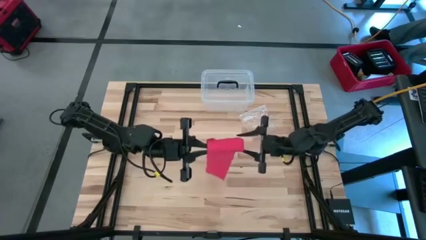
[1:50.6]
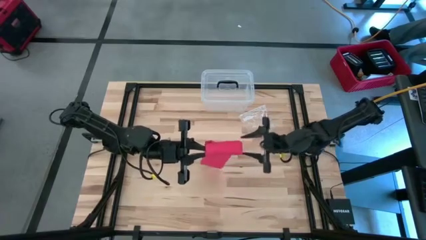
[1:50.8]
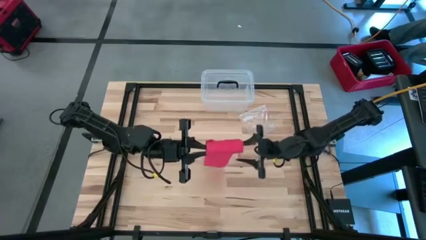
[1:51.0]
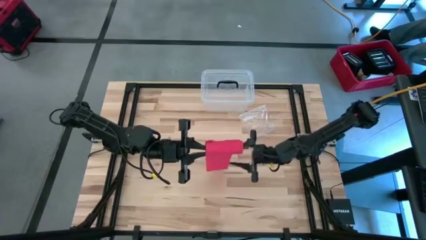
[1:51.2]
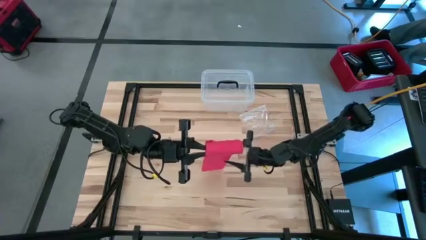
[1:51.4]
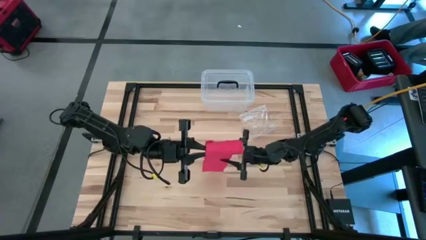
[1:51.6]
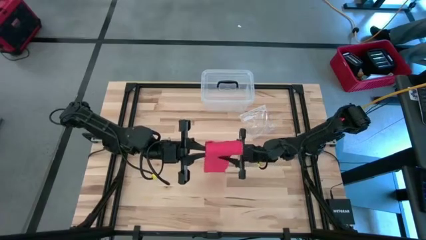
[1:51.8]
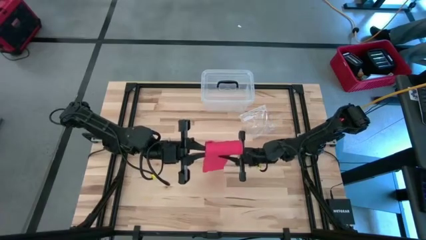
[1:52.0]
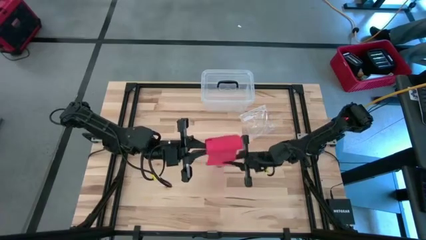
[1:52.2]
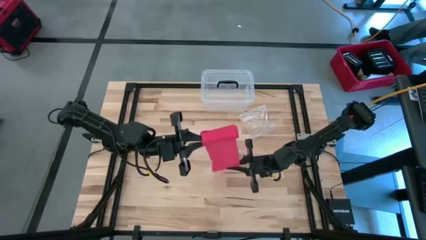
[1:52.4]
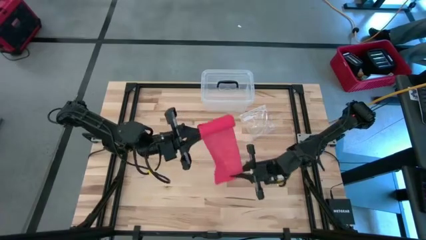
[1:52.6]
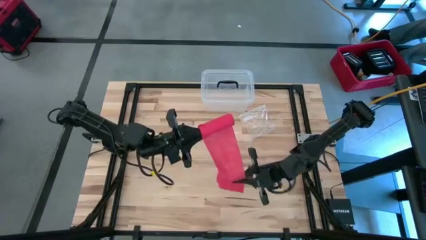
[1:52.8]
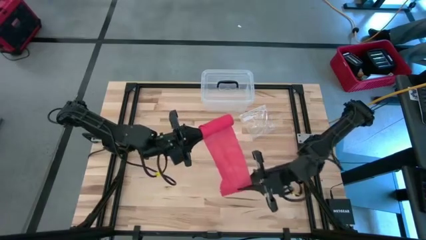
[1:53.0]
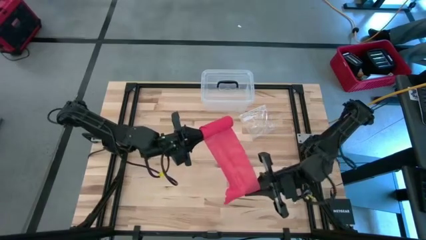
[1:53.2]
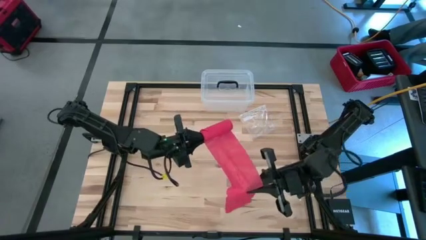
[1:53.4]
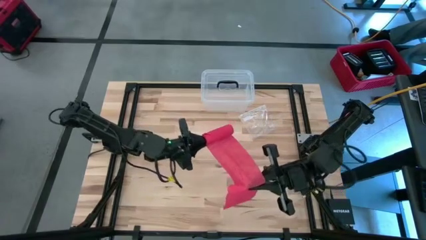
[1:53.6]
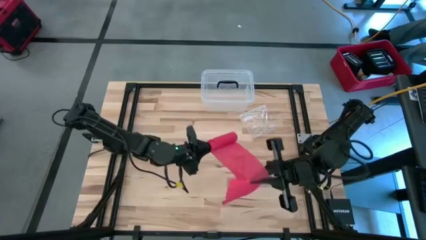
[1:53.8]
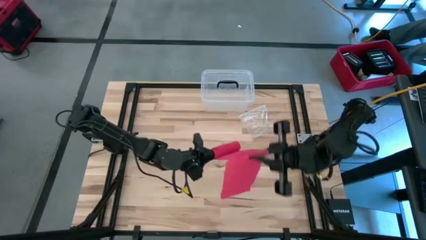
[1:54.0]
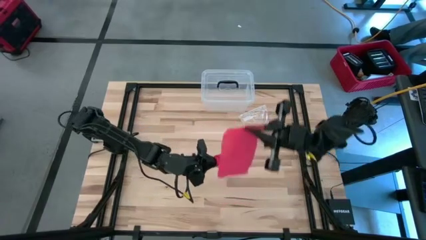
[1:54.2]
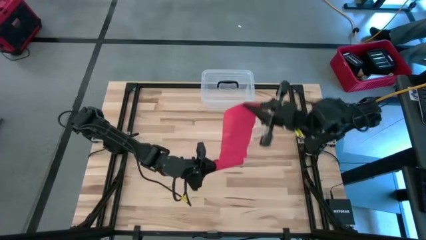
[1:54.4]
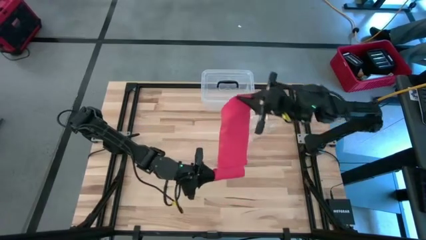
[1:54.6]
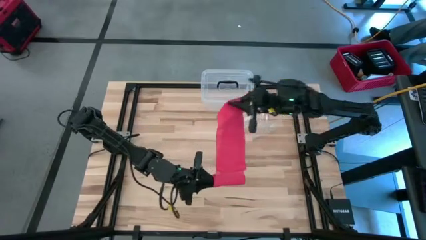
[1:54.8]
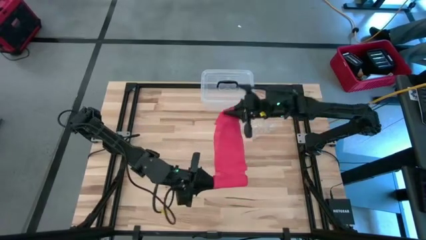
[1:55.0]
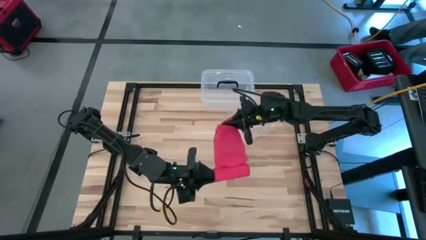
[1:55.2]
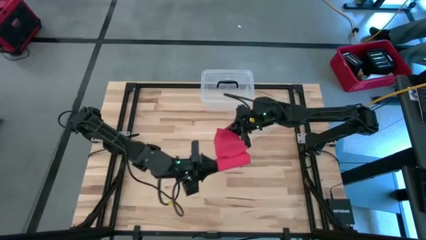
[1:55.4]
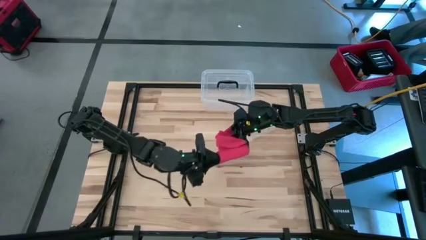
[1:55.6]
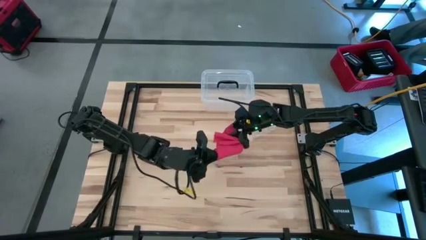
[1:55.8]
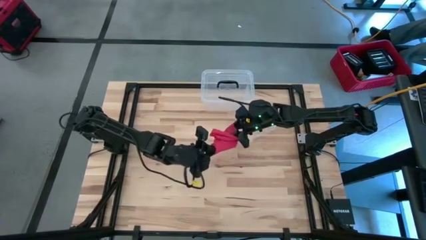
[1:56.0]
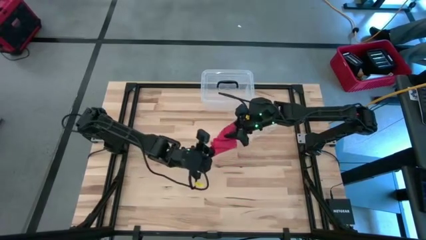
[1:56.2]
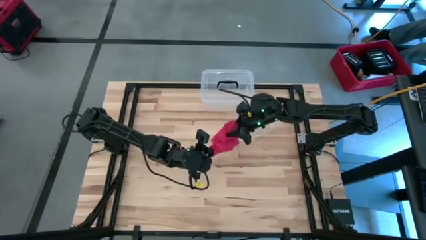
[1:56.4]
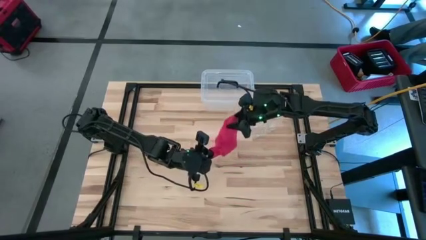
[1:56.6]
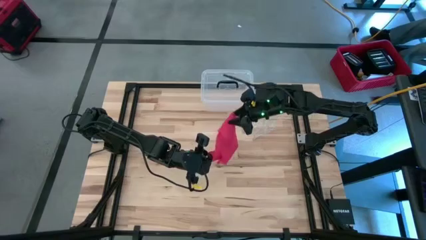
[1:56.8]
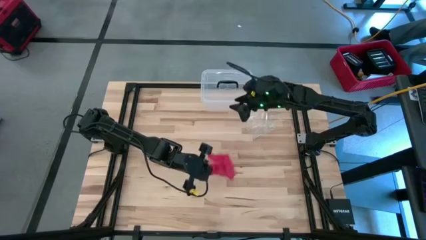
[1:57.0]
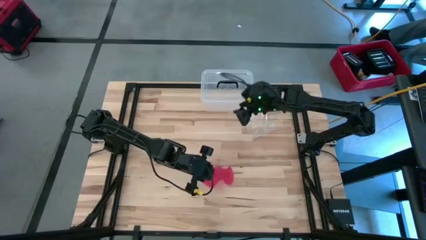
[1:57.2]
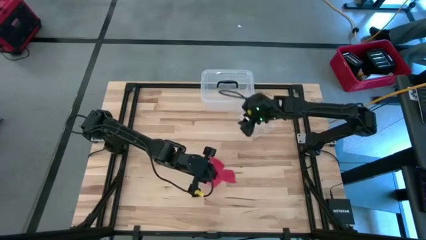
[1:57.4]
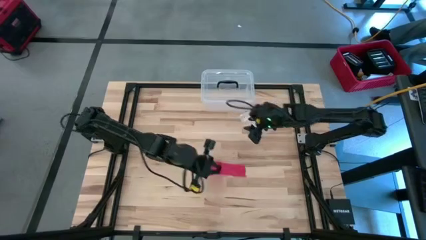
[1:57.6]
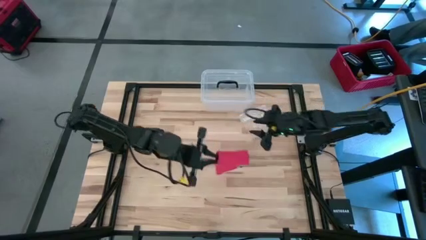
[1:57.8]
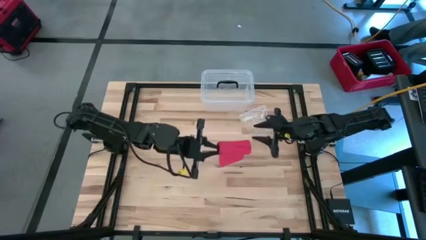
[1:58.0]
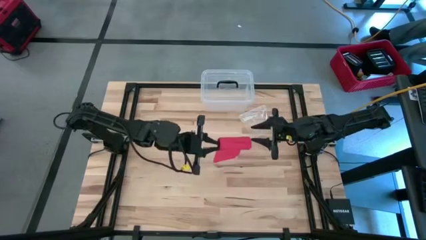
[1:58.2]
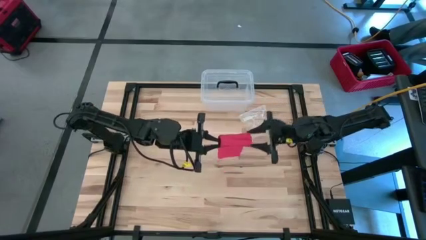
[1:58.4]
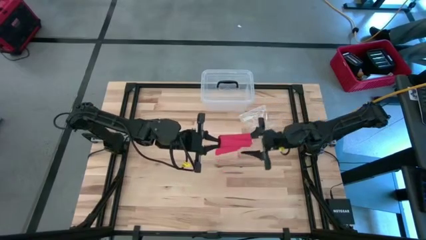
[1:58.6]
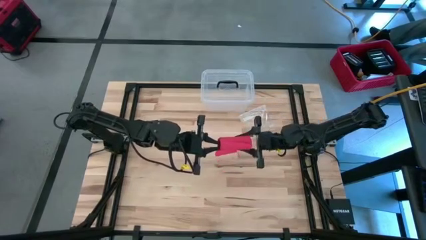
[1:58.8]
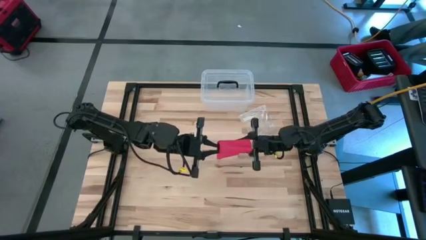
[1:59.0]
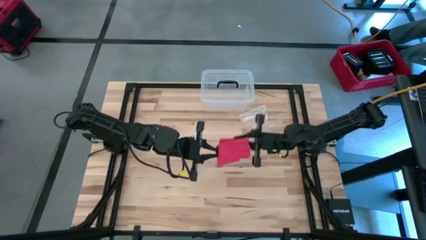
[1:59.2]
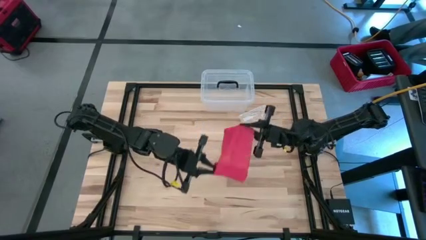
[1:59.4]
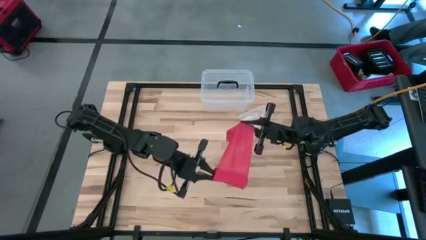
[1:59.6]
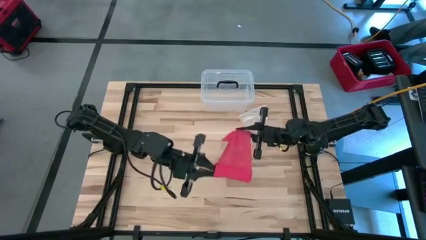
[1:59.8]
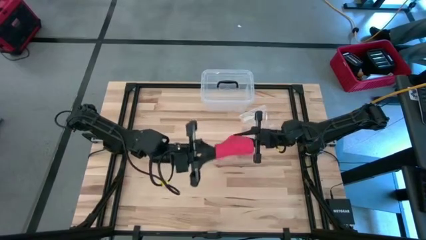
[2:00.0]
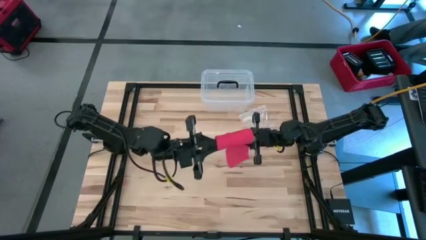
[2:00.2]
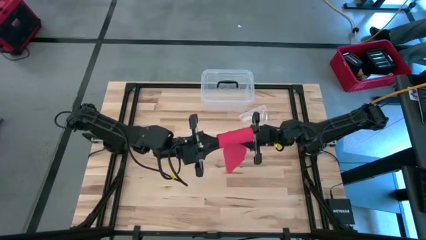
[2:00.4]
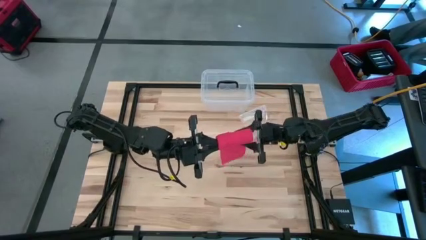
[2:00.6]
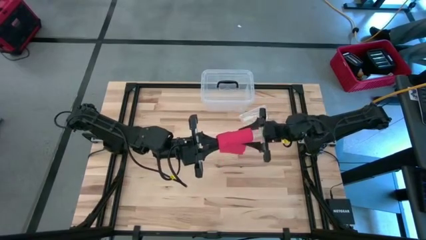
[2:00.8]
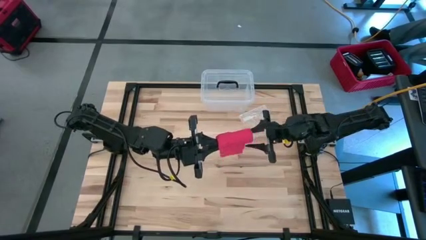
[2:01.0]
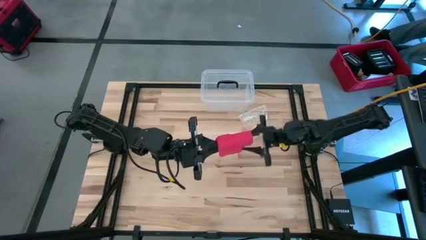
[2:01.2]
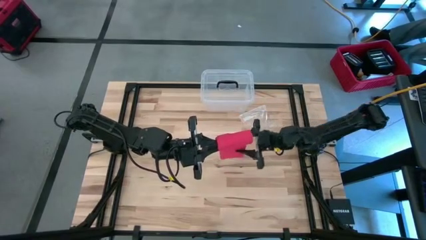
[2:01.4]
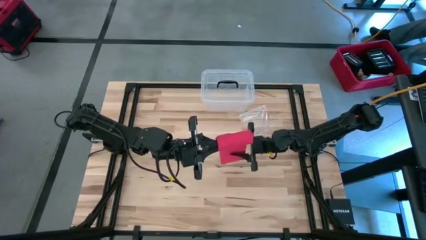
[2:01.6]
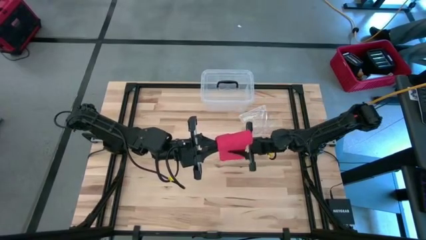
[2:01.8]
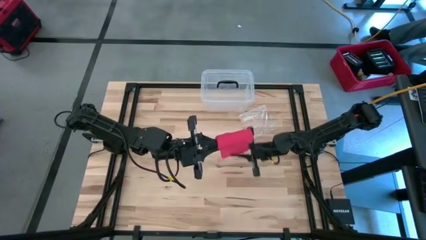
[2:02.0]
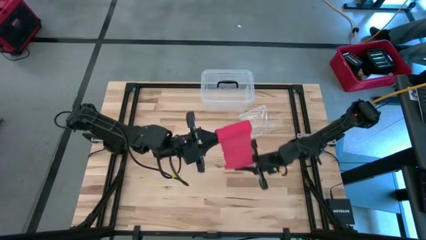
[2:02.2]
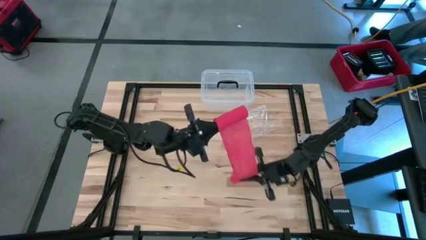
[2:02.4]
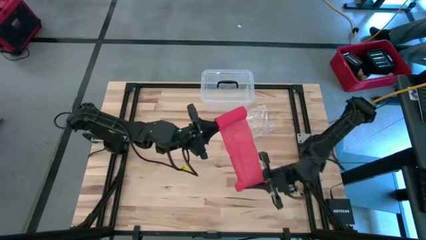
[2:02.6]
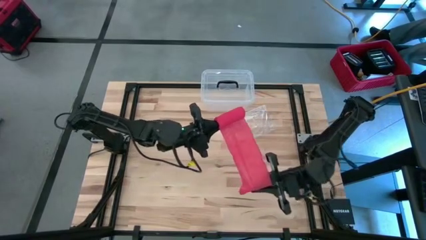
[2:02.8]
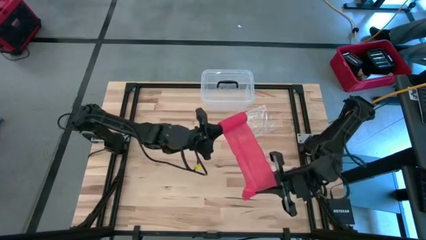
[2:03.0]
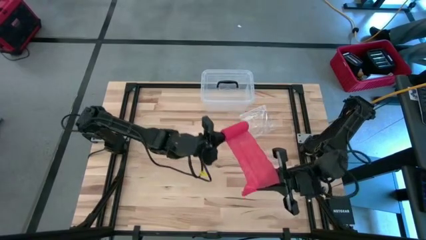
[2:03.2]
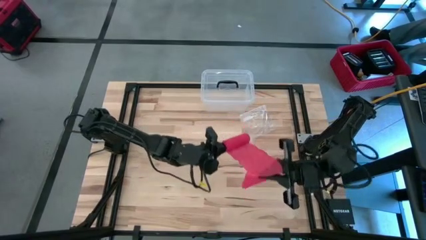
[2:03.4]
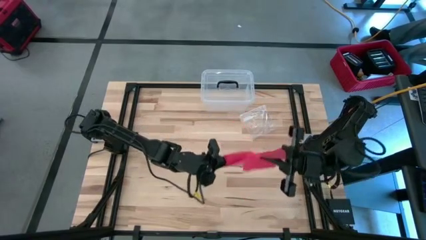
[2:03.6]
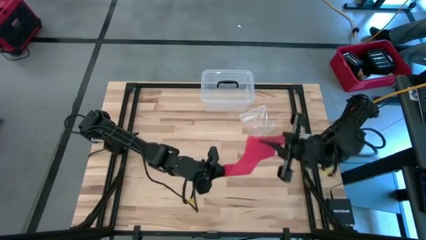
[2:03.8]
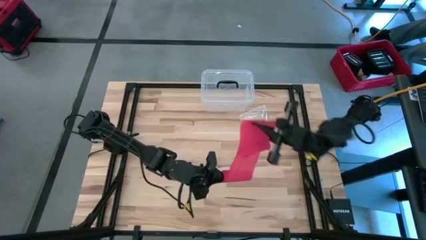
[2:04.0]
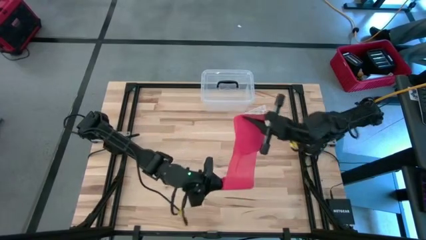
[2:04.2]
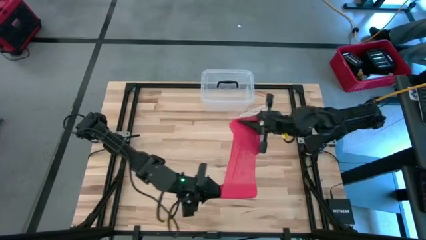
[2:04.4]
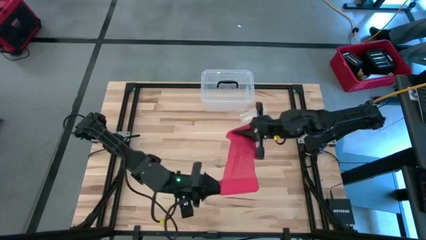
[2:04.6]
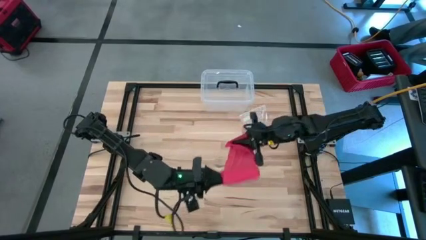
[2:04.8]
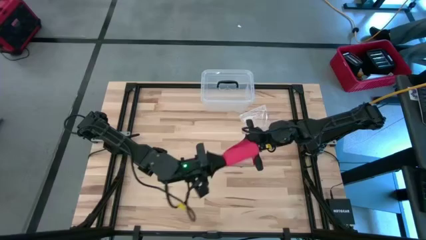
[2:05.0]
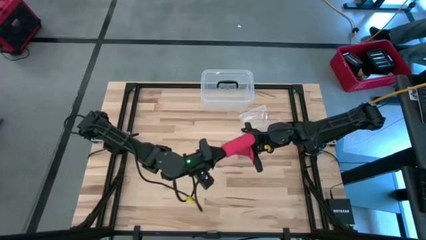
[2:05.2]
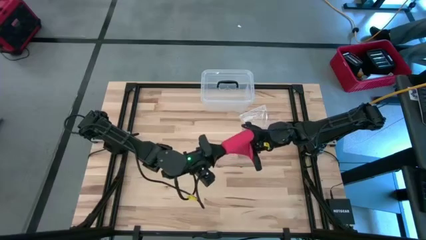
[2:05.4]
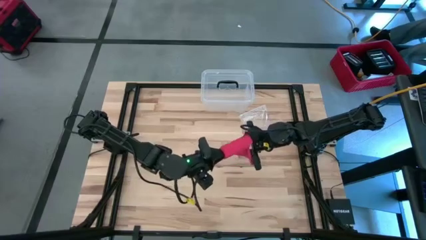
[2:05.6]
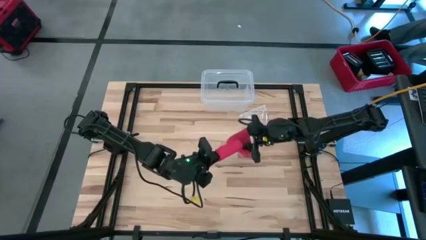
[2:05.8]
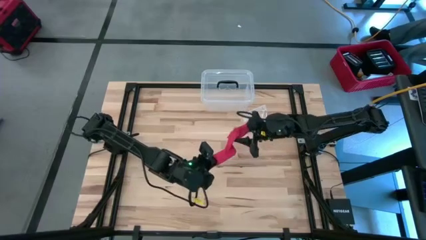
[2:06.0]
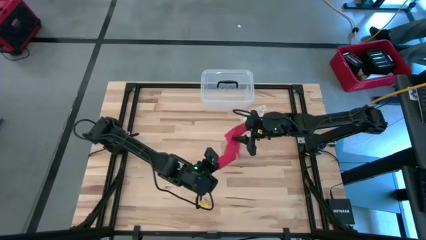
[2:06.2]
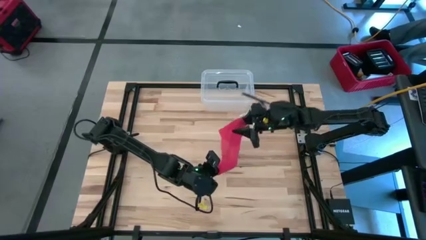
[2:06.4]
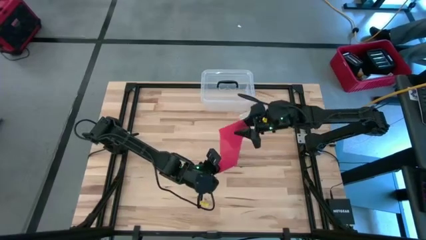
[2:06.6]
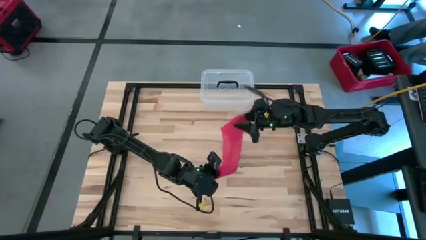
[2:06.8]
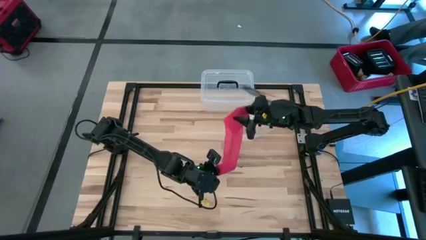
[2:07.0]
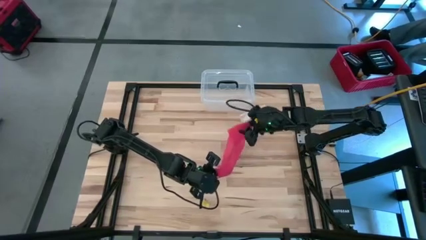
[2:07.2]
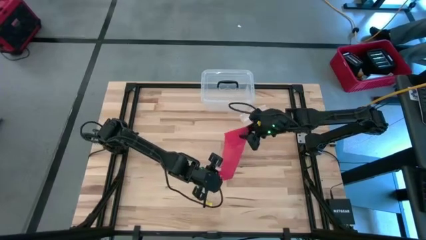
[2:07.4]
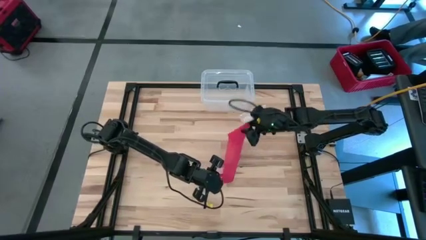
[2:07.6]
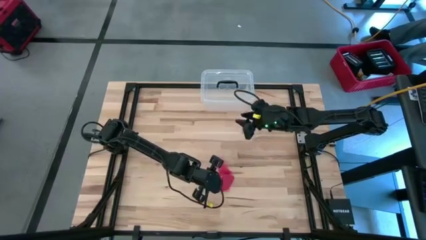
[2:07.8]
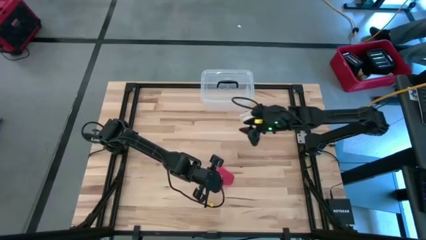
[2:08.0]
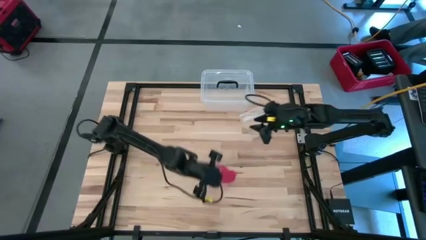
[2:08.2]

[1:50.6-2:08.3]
Task: Roll bandage
Roll the red bandage
